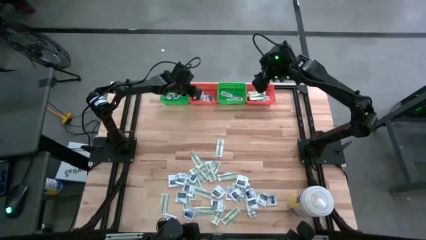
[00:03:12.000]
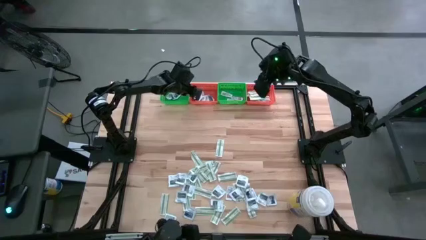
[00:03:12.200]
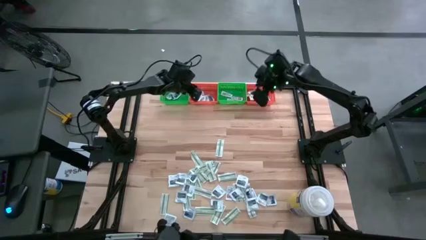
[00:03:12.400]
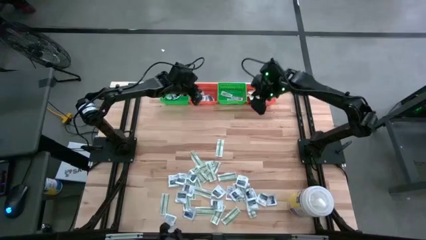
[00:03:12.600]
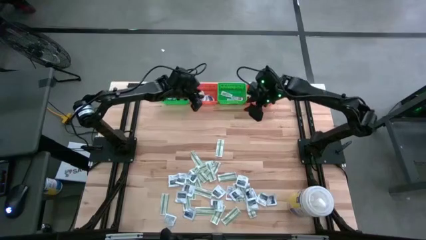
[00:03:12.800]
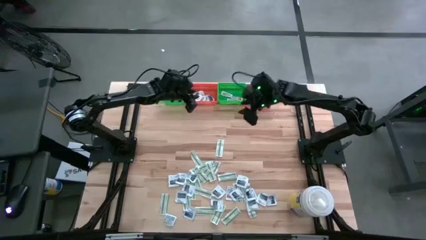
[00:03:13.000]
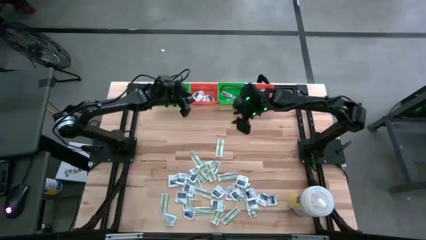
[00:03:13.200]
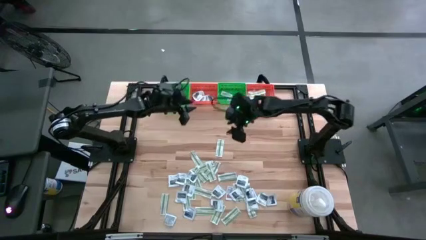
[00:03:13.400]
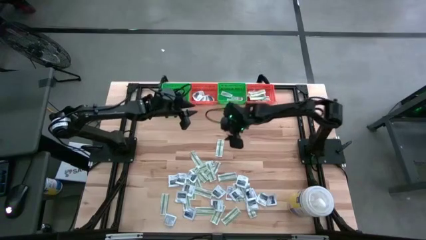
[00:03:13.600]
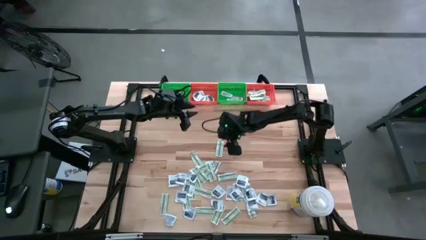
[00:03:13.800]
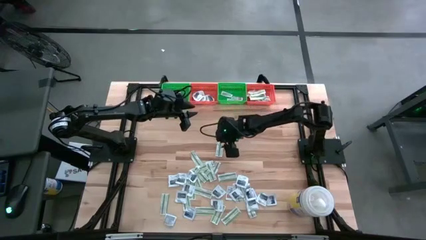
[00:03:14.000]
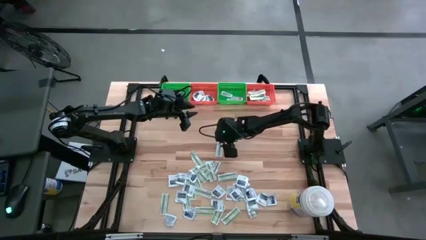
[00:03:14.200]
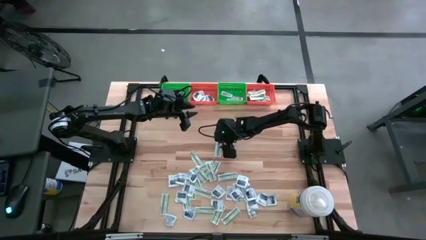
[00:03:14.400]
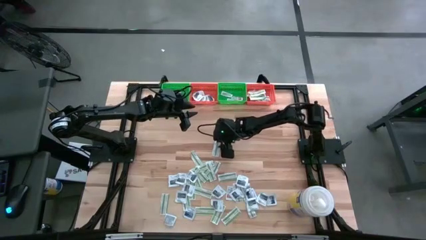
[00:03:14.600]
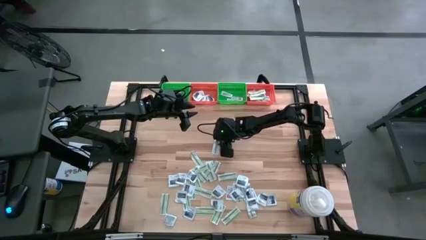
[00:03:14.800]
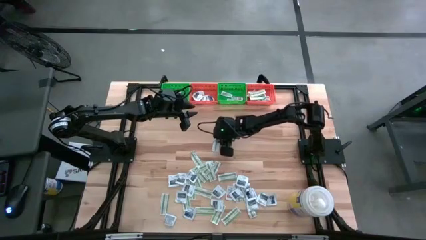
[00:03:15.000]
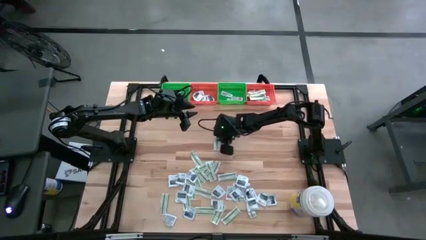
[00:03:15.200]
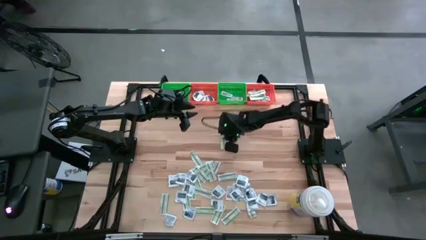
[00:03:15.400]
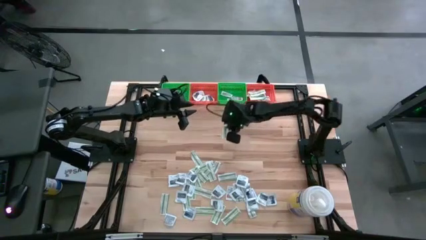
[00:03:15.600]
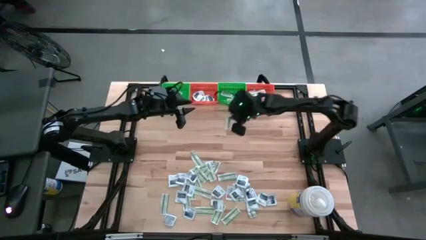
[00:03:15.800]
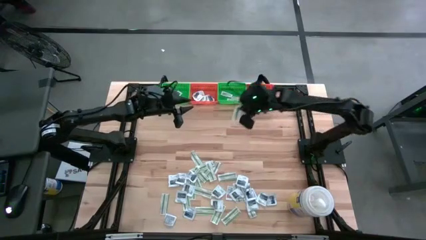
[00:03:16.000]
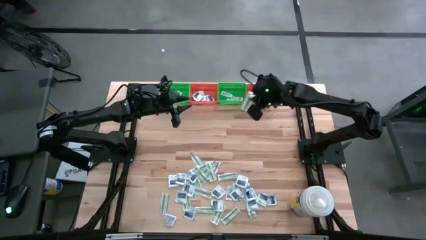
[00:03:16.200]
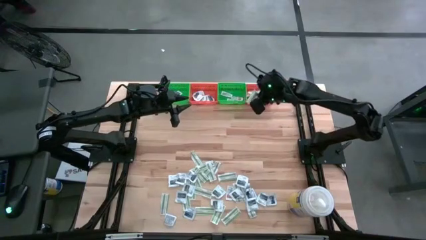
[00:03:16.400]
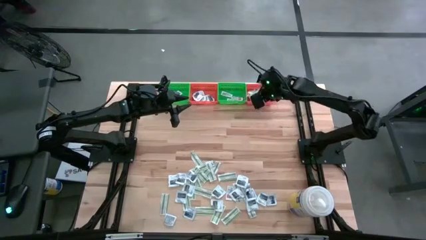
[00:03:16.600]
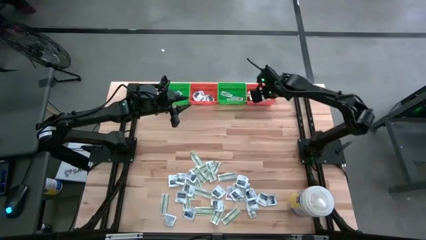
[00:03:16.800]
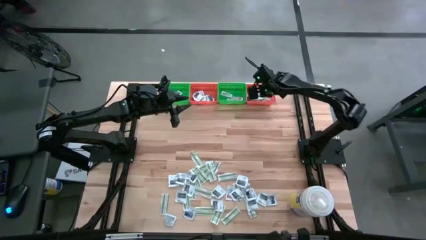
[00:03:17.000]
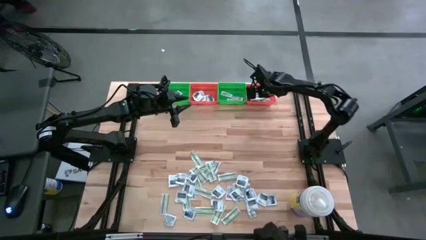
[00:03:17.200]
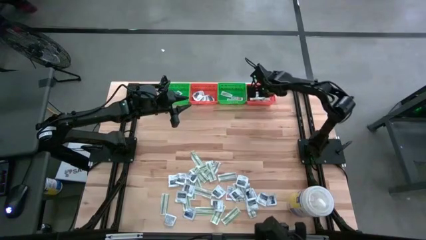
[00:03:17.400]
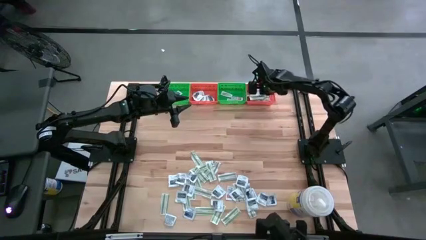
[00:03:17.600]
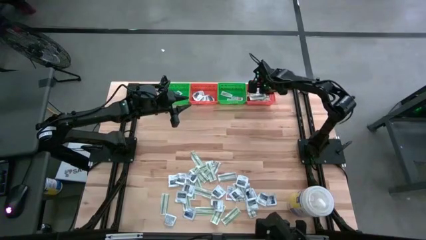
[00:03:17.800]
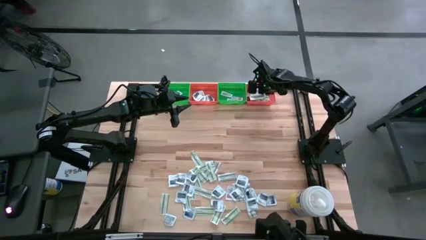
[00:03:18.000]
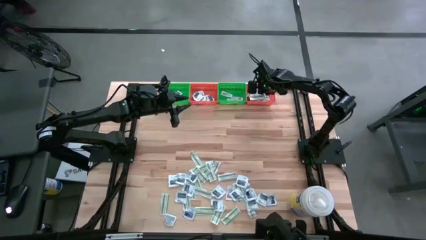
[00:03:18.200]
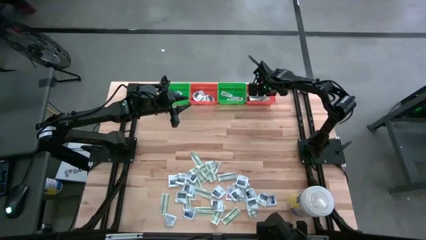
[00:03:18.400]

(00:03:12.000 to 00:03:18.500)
Task: Pick & Place First Aid Supplies
Put the green bandage pack in the right orange bin

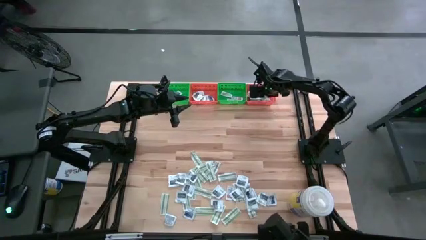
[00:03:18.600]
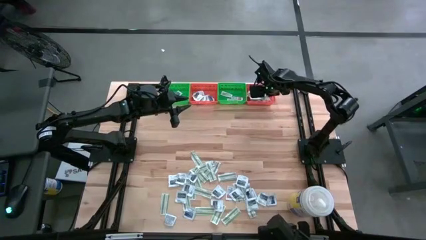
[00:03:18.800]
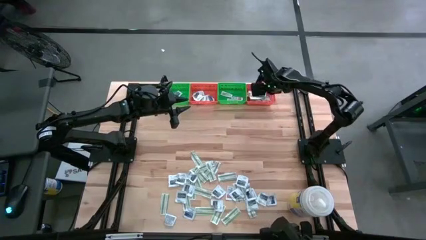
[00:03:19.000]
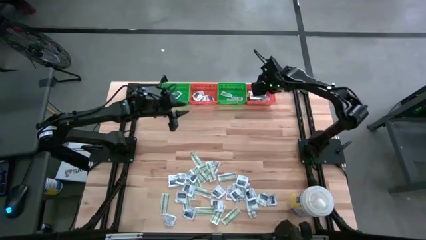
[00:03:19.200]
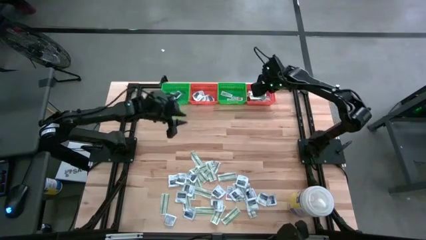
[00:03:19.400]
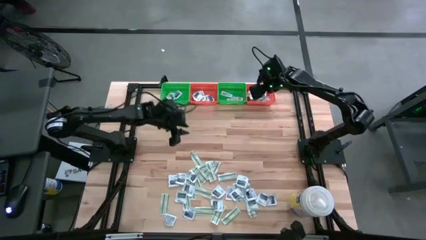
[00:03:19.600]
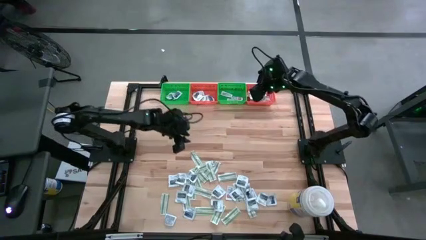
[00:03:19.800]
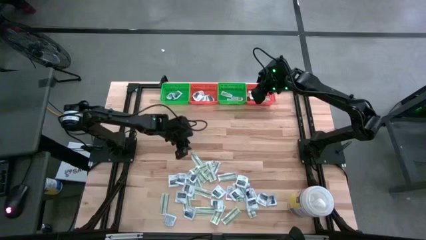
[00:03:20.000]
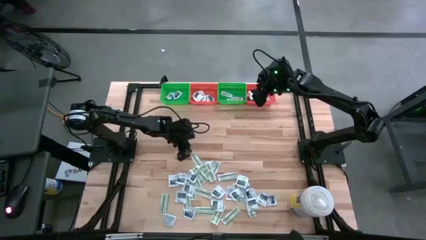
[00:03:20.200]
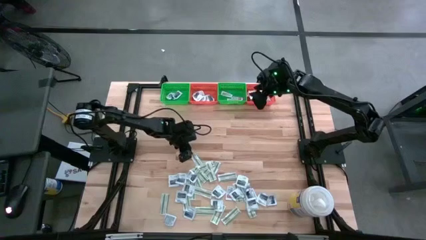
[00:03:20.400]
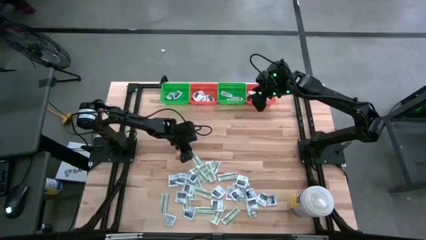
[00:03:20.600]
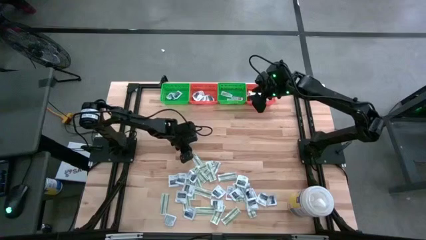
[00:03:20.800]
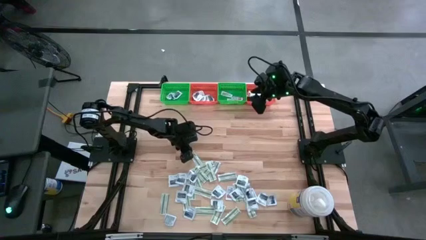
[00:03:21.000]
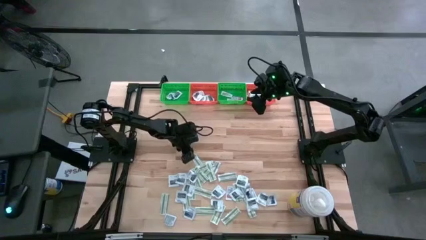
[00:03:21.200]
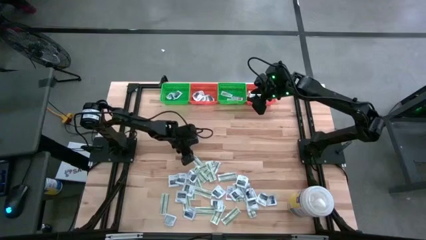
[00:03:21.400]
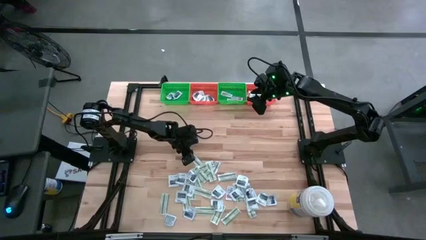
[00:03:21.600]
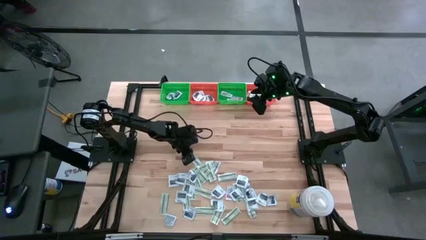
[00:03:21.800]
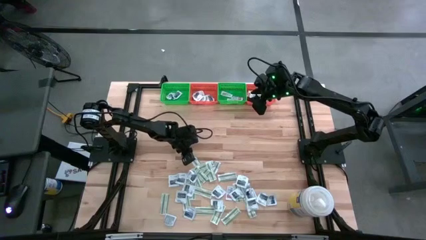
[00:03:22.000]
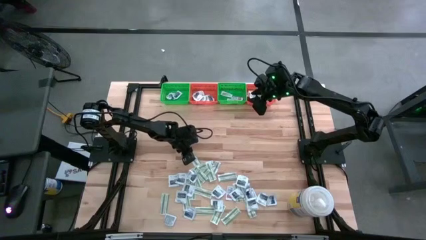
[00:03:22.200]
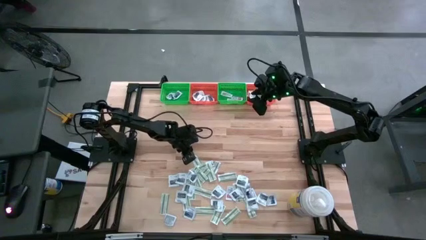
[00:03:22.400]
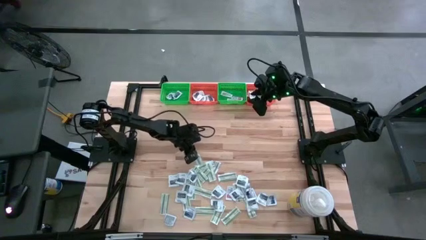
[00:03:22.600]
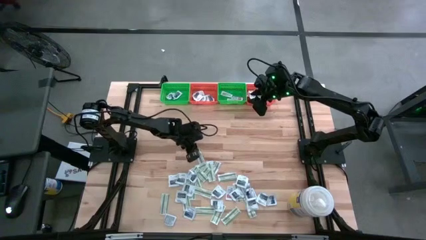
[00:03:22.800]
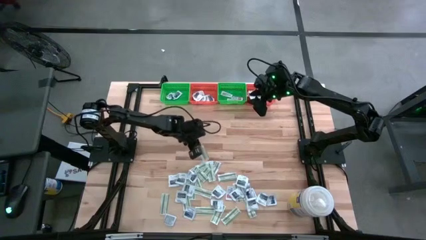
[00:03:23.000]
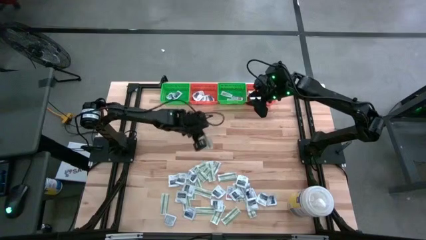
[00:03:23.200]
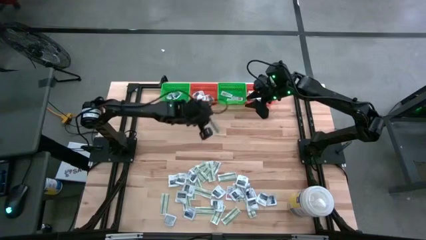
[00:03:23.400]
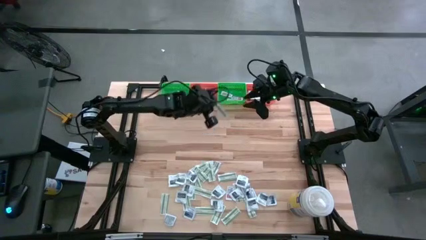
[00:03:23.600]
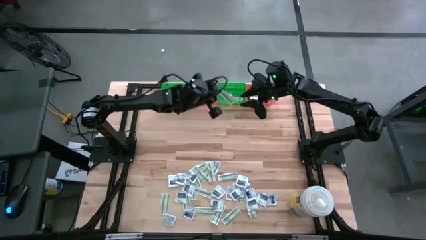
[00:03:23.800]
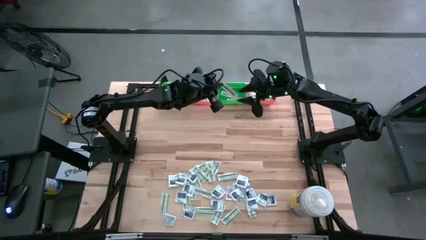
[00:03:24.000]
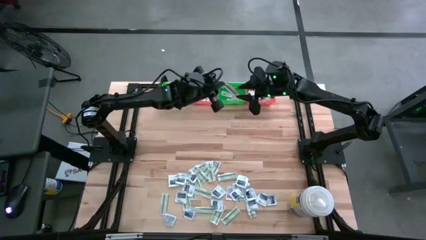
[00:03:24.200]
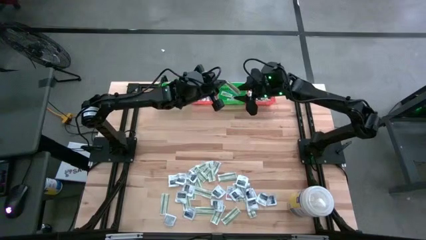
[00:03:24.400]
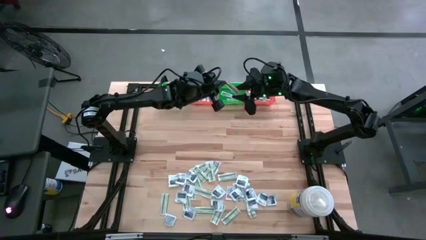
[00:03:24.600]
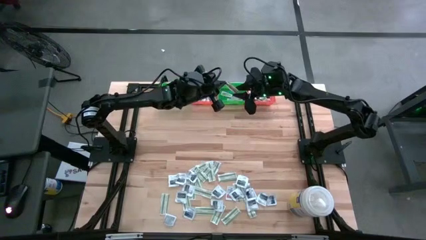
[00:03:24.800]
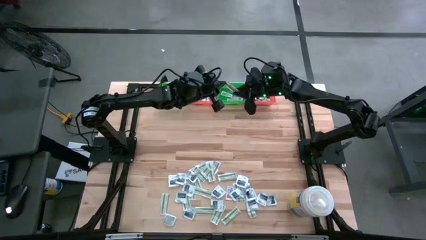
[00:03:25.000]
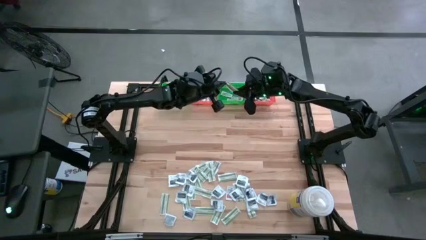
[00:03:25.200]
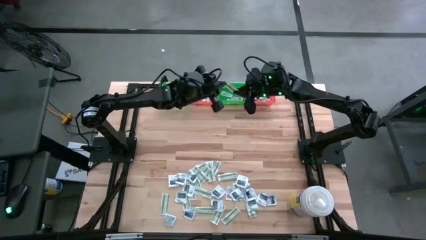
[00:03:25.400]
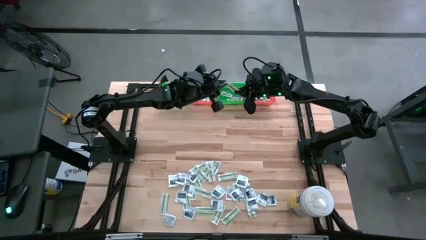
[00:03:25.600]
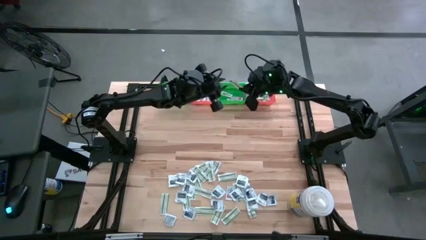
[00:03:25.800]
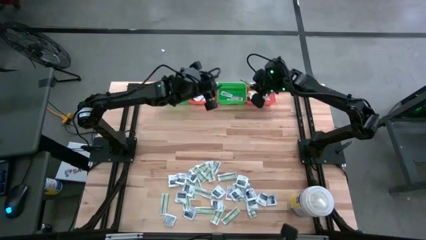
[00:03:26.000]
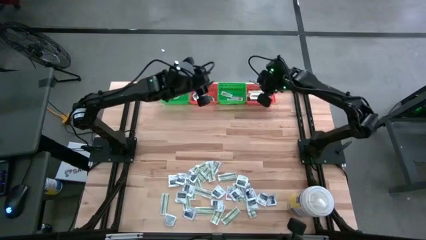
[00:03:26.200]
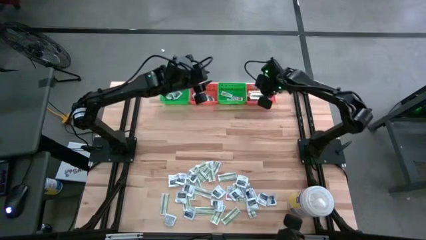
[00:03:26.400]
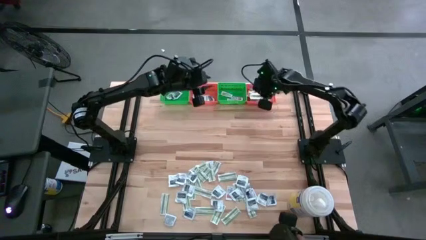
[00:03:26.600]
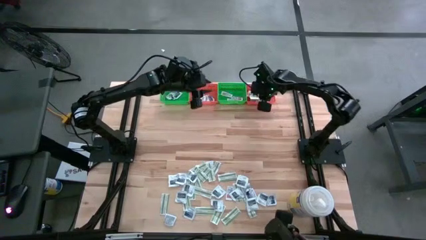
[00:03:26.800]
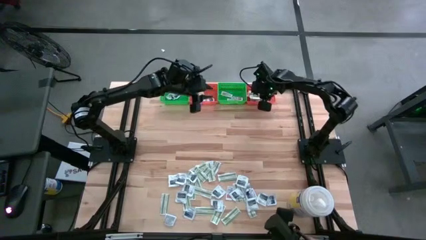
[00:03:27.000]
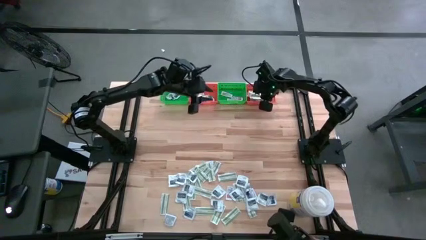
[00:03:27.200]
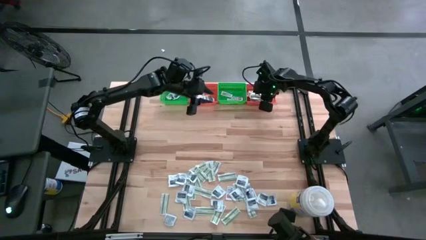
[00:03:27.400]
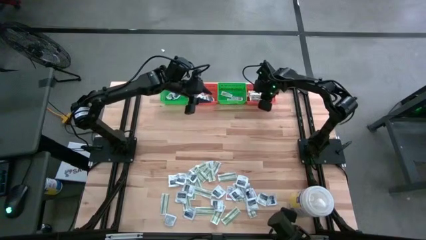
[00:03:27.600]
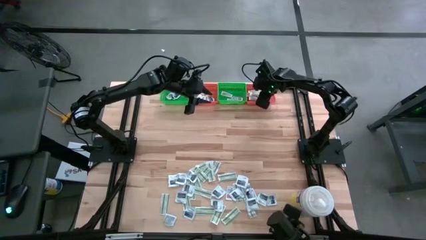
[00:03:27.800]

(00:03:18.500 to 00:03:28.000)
Put the green bandage pack in the right orange bin
